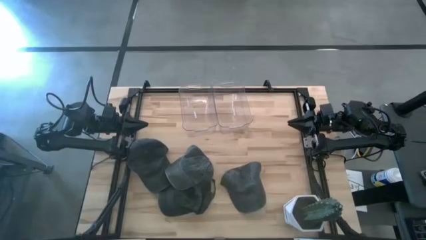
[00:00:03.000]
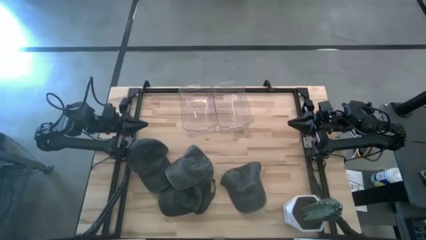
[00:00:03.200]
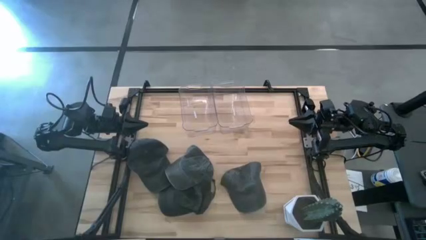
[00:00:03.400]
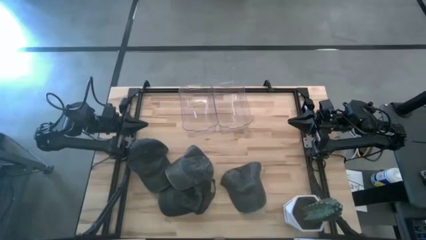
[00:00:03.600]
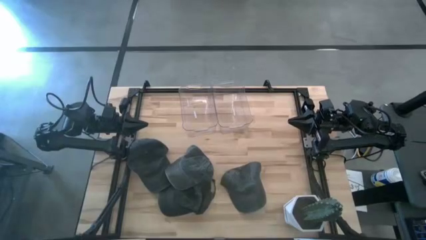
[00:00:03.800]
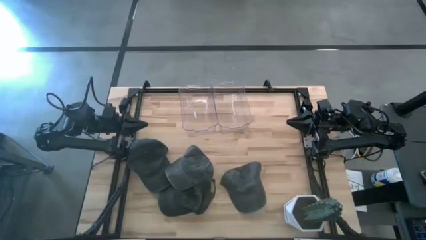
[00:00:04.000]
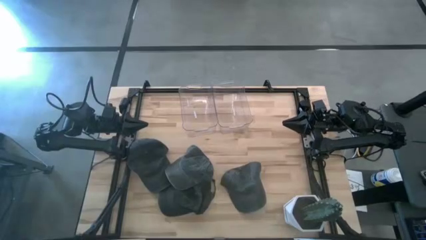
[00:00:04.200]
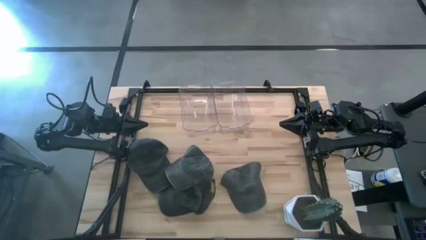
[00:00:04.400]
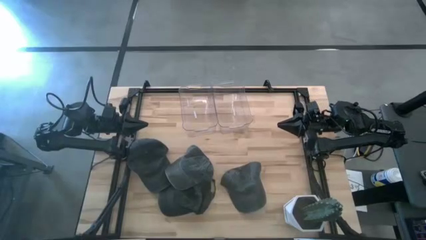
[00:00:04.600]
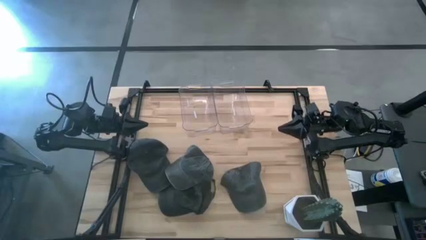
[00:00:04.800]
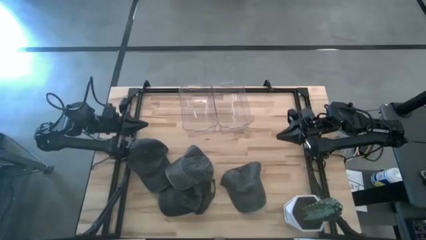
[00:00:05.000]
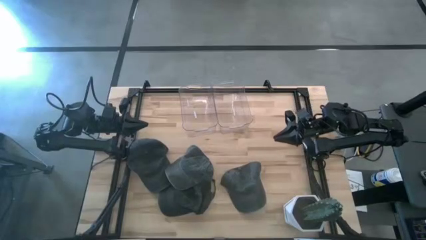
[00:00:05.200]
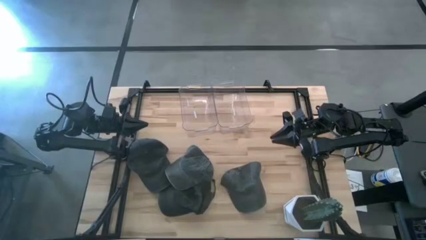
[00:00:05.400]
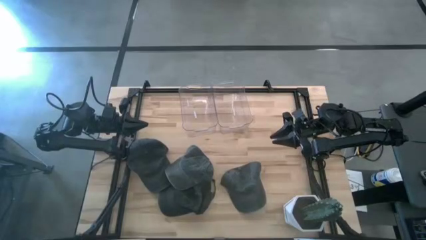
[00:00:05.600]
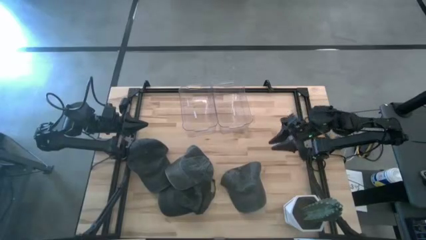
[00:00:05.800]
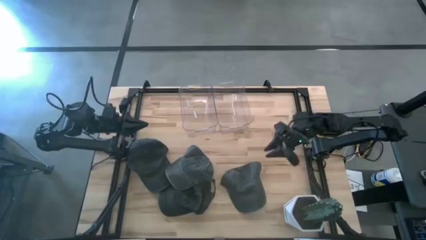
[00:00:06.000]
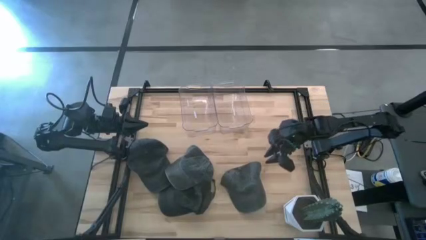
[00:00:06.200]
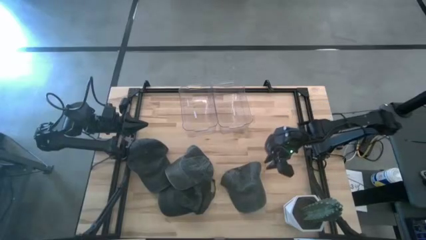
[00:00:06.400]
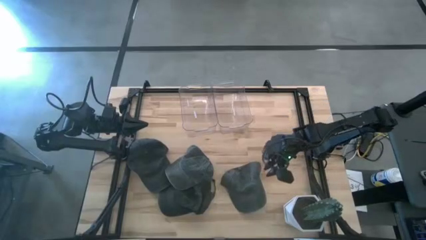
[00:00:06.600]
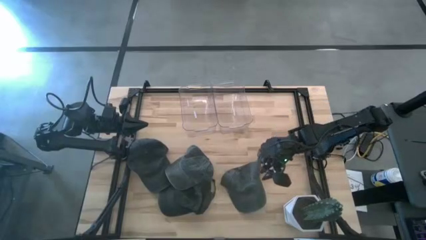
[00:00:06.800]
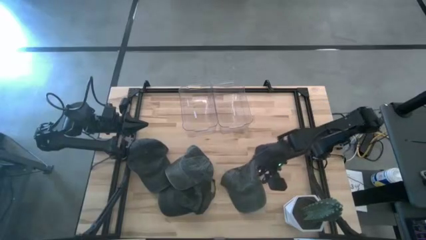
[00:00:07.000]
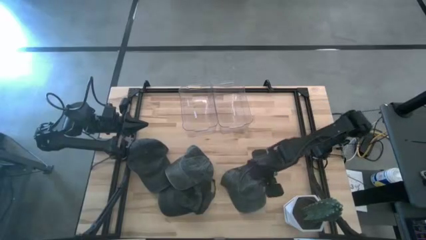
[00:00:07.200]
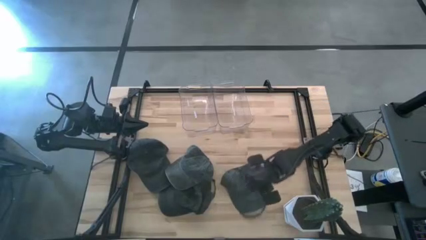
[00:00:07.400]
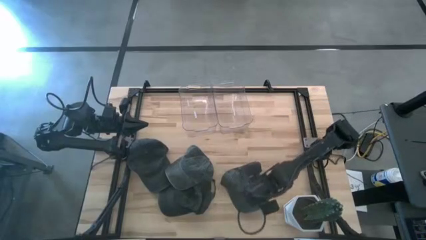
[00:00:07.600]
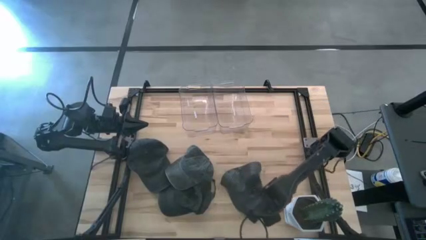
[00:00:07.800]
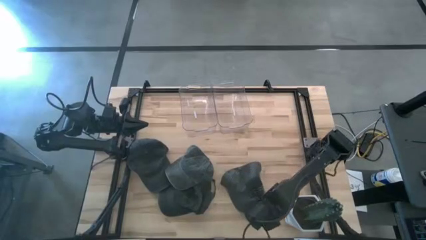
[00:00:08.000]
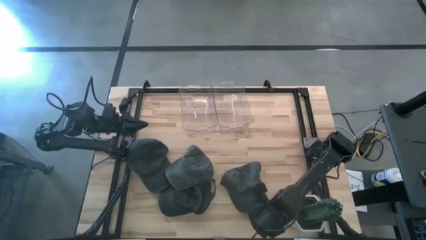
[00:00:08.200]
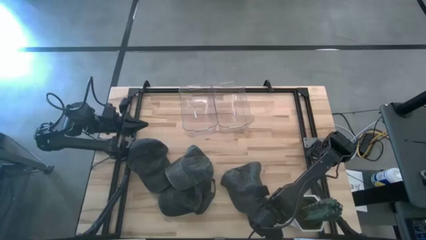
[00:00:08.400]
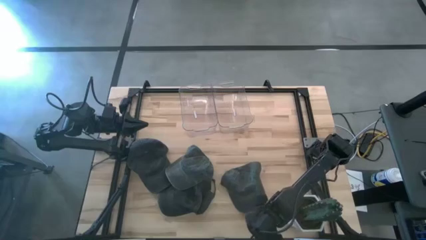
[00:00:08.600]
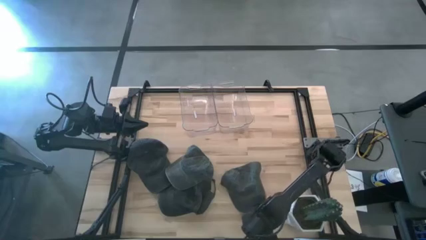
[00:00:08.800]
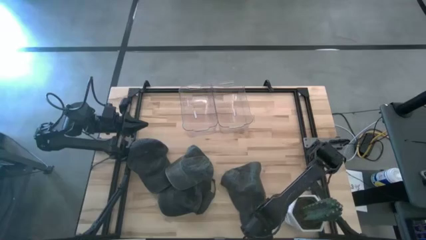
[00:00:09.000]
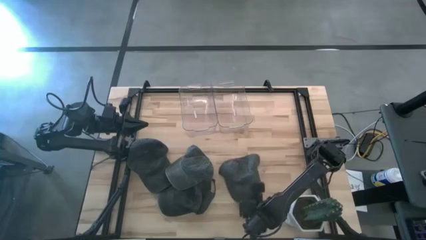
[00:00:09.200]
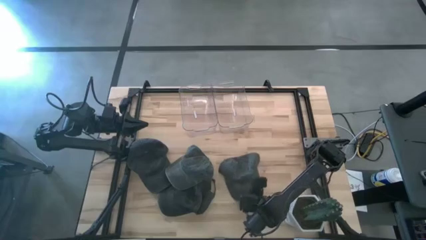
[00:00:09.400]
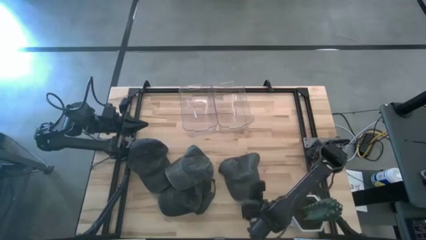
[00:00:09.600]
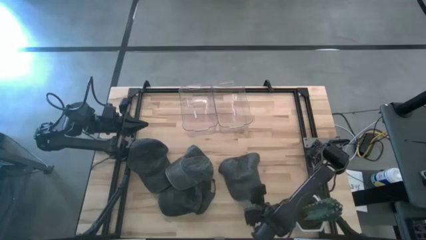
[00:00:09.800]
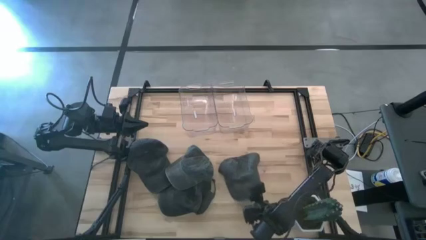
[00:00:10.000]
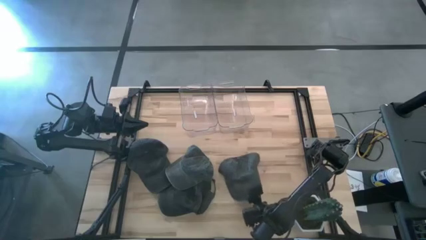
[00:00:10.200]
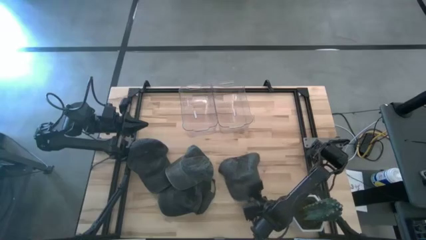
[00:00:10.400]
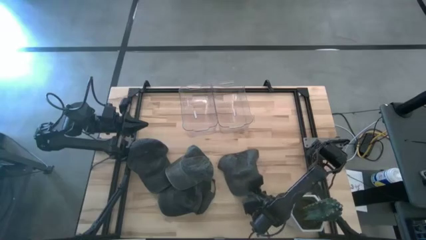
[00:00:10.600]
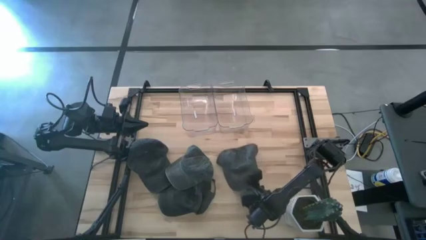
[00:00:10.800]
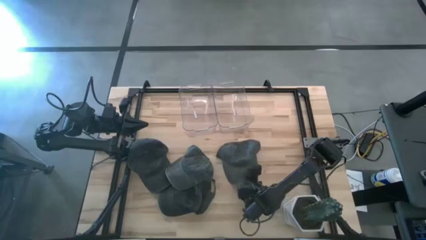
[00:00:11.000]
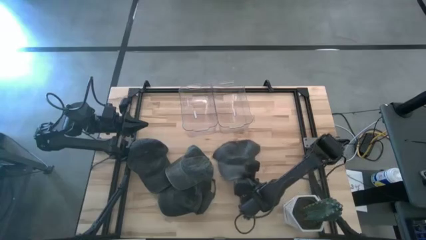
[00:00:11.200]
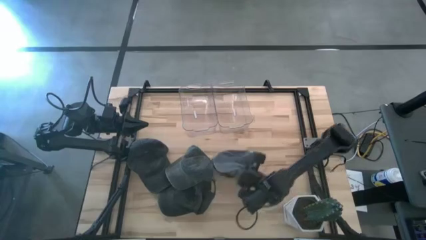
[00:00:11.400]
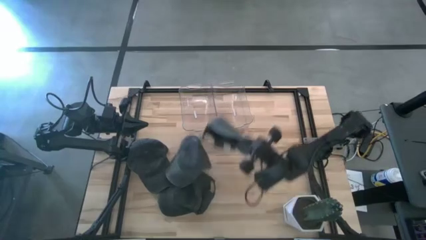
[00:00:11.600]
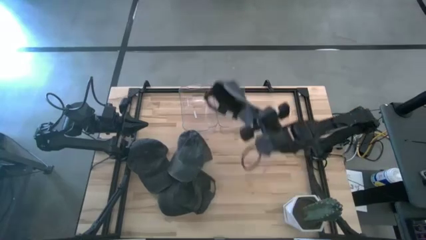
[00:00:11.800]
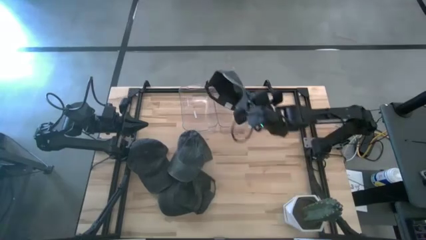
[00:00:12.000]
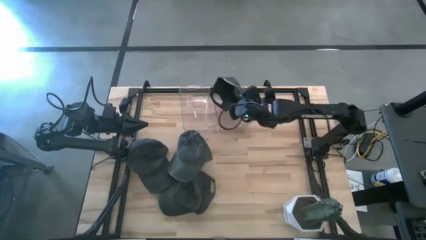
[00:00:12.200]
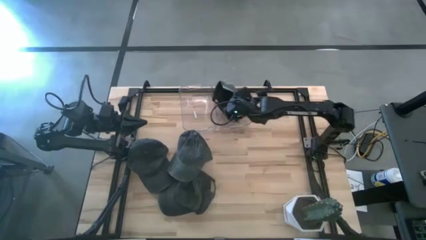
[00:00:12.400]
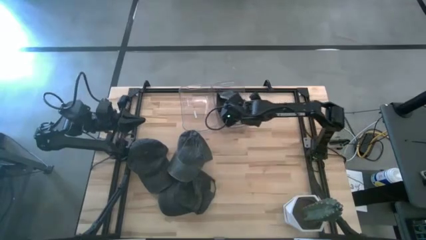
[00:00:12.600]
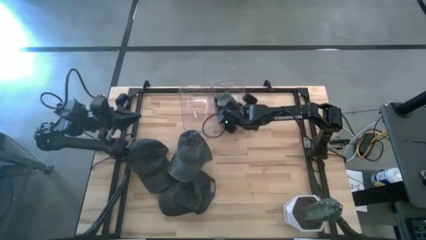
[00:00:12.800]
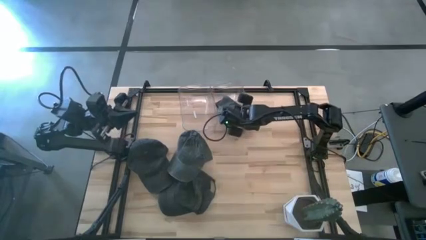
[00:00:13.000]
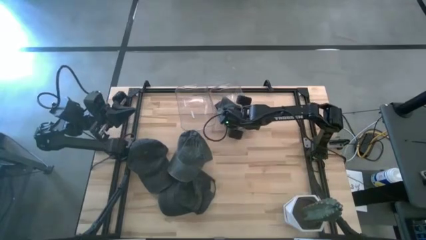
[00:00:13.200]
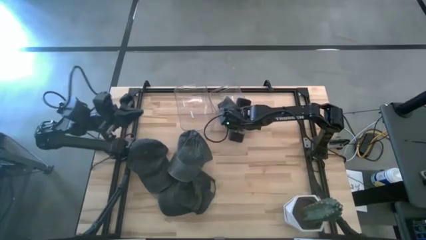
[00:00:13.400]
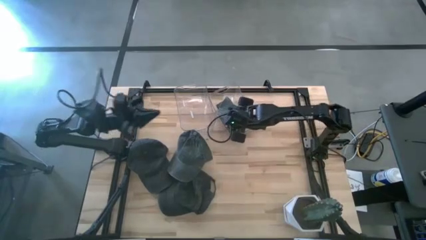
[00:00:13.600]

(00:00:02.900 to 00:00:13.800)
Task: Pick & Place hat
Put the right gray cap into the right transparent bin

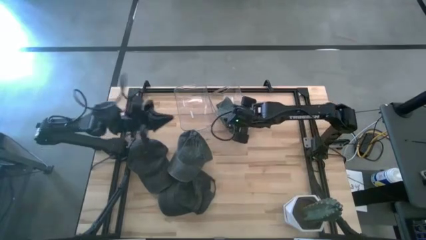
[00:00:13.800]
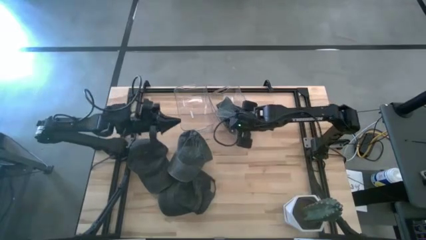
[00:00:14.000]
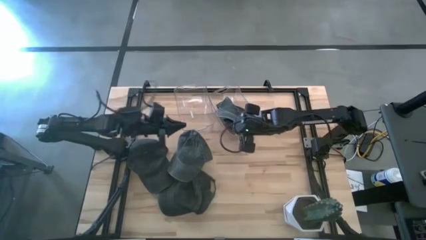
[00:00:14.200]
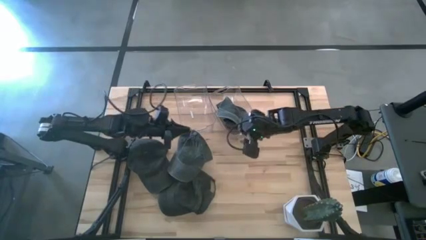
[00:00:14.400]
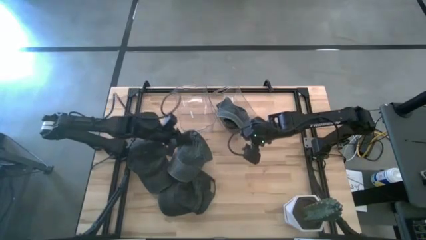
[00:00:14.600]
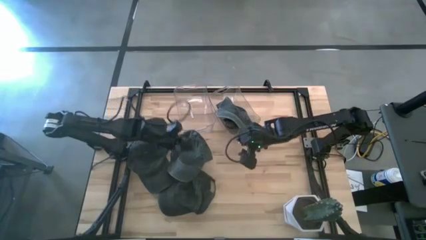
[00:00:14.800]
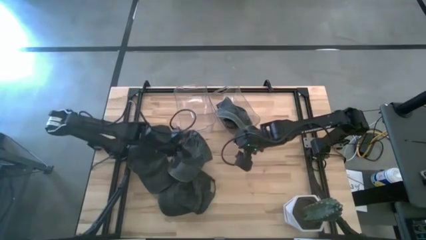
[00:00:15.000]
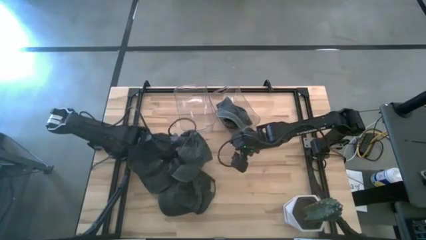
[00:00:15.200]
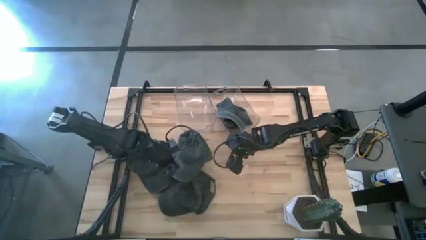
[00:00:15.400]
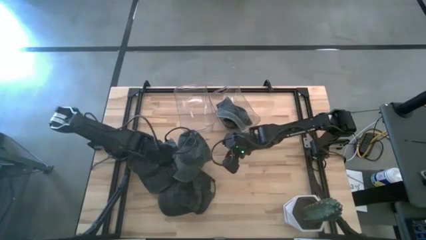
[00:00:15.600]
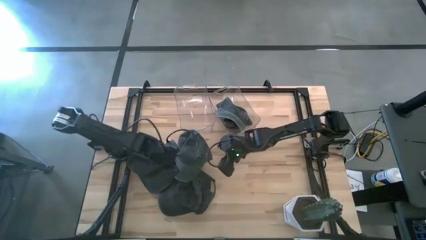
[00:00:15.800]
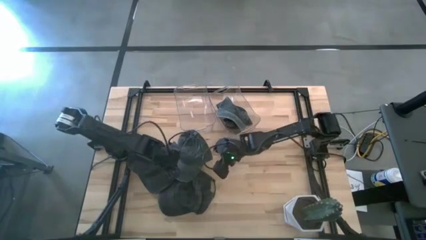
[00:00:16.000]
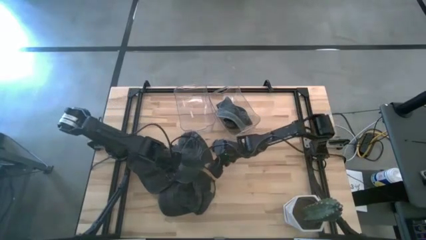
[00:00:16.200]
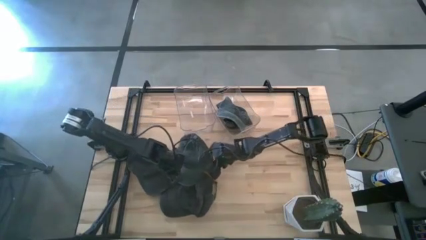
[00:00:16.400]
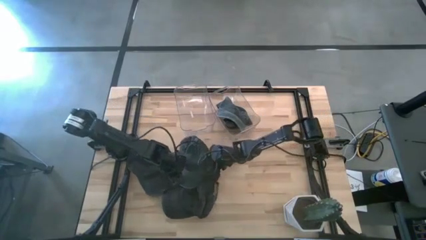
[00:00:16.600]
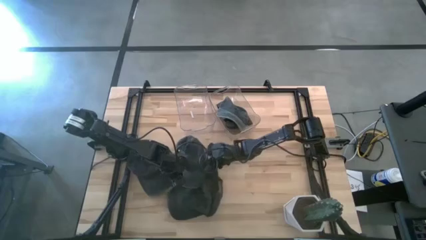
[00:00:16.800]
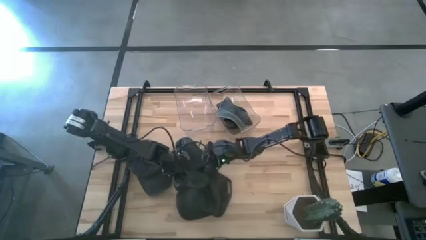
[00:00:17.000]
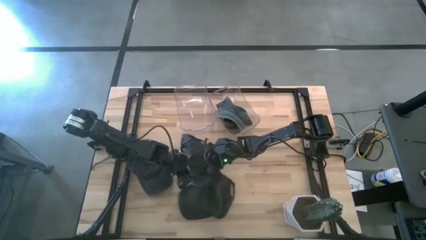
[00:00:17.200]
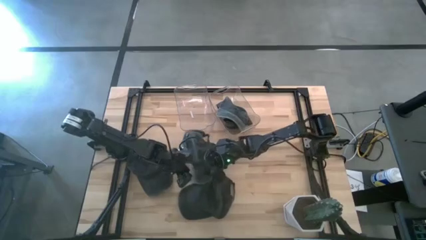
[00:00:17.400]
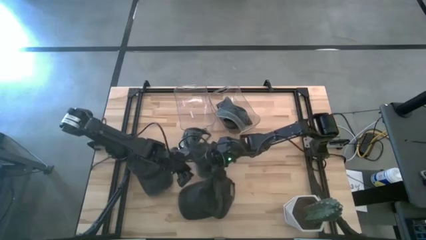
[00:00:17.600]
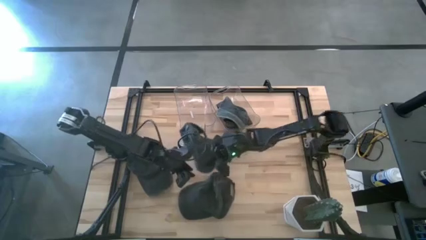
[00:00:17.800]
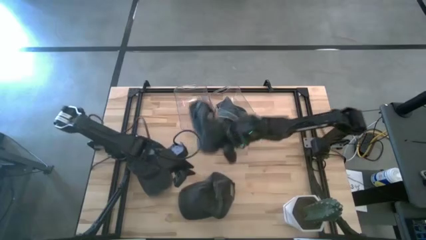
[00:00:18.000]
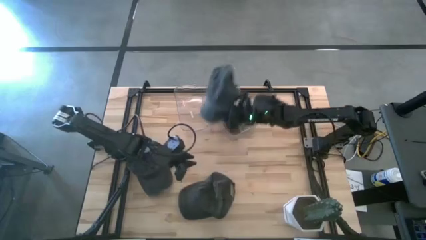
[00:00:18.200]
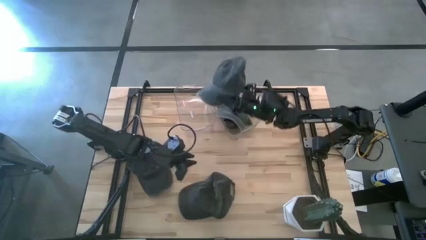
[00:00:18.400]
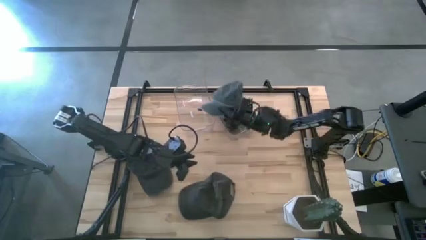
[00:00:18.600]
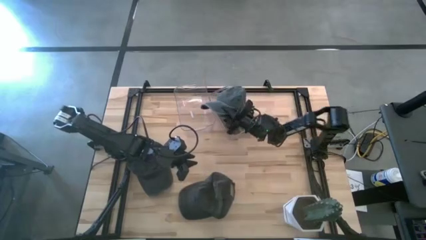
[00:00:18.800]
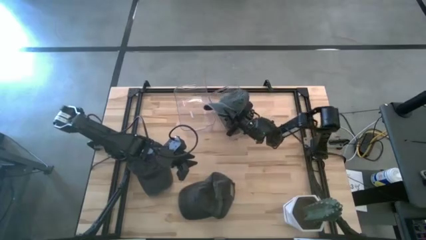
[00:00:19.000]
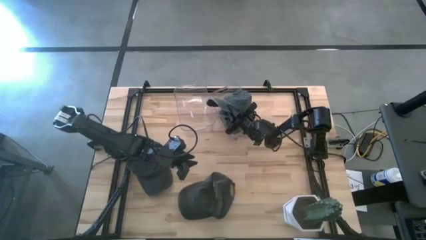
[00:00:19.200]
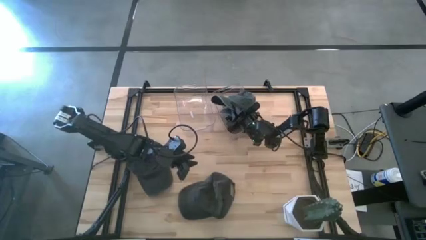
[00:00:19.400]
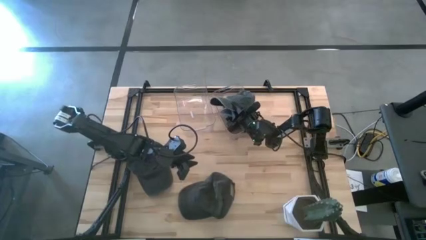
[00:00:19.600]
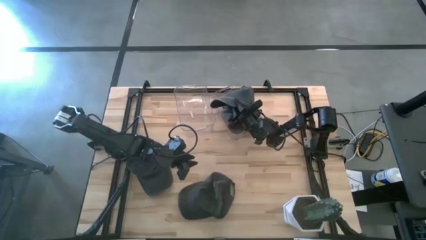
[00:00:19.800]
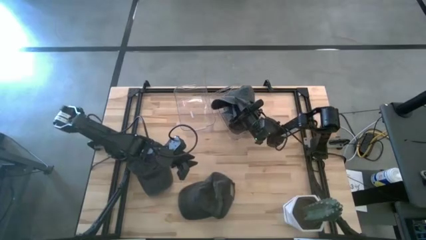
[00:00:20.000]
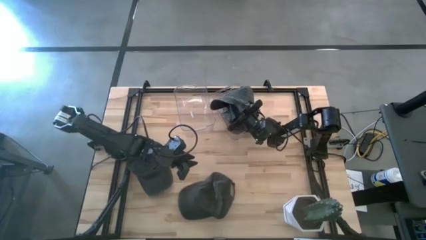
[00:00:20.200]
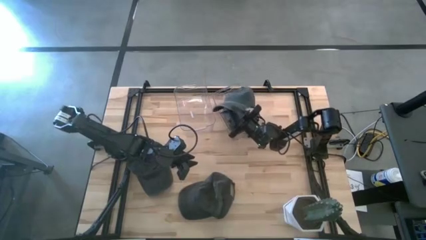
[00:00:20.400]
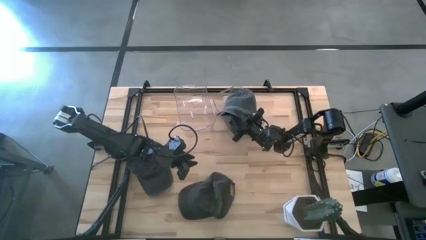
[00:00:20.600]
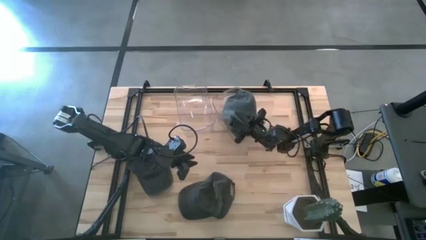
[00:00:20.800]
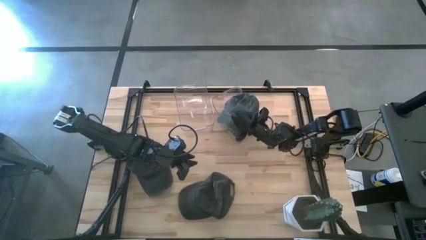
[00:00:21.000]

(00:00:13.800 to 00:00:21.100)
Put the gray cap into the right transparent bin
